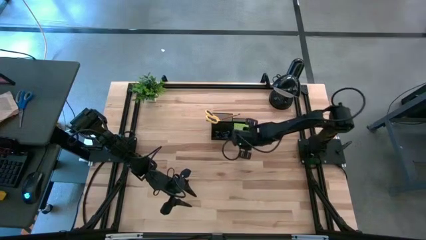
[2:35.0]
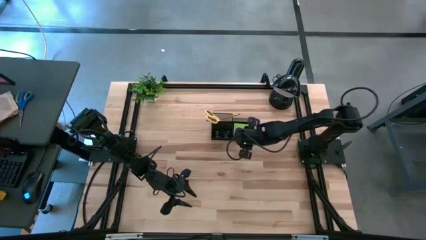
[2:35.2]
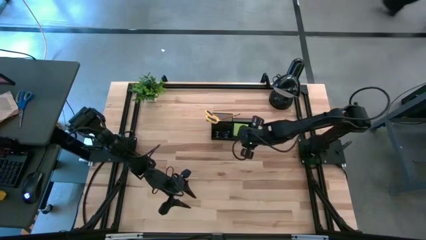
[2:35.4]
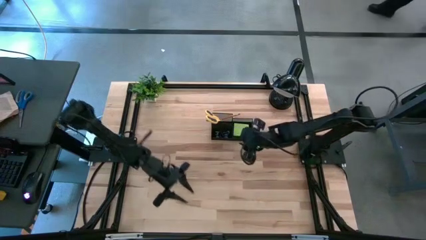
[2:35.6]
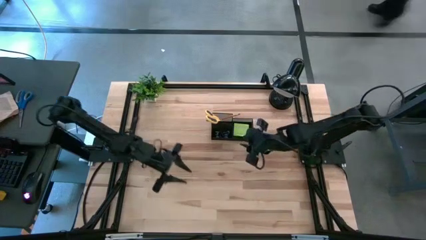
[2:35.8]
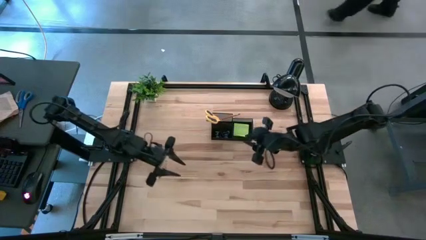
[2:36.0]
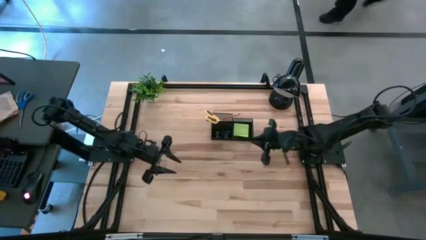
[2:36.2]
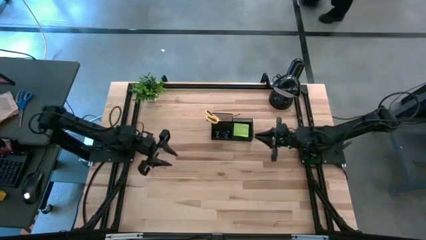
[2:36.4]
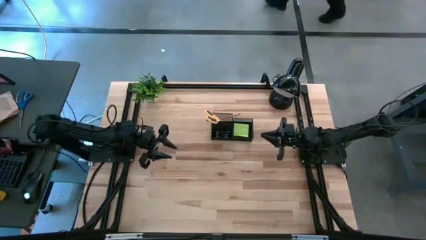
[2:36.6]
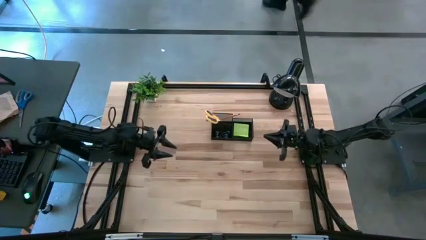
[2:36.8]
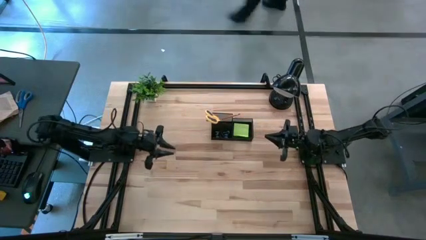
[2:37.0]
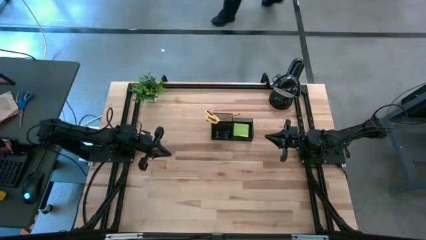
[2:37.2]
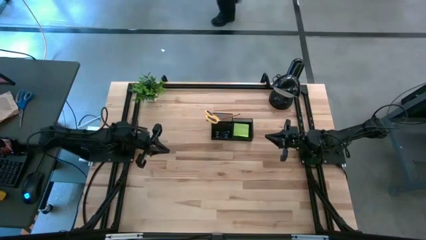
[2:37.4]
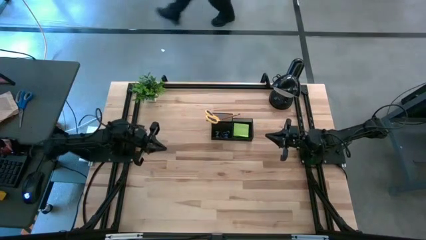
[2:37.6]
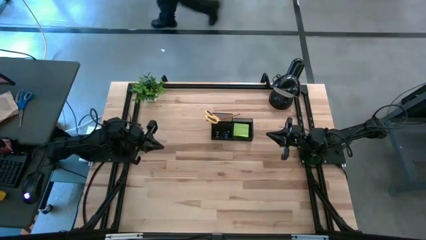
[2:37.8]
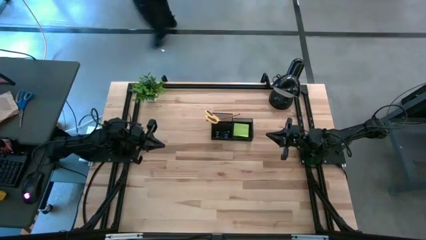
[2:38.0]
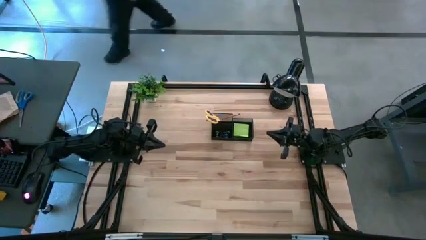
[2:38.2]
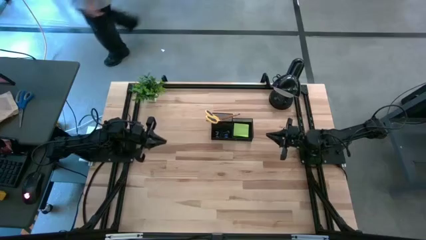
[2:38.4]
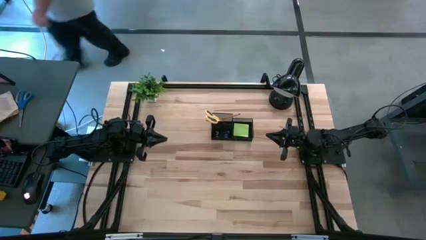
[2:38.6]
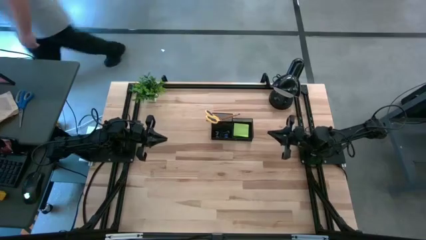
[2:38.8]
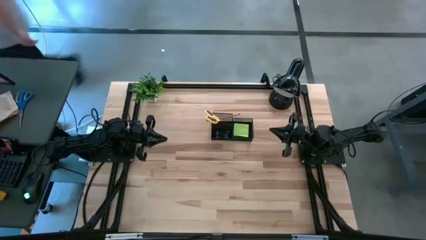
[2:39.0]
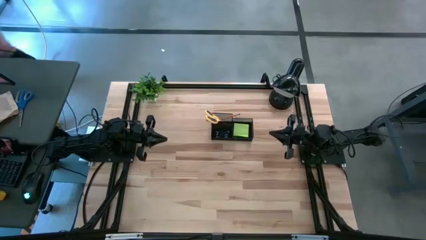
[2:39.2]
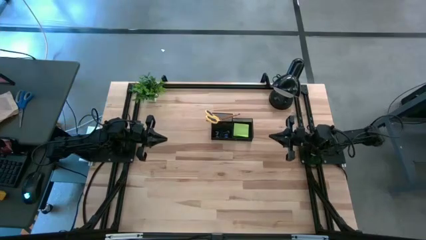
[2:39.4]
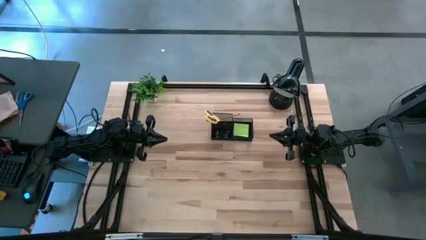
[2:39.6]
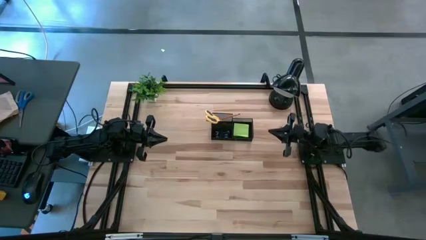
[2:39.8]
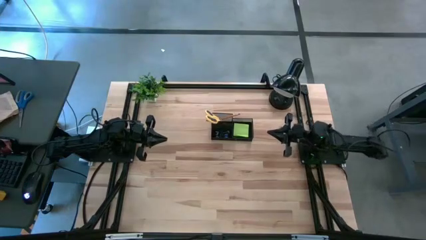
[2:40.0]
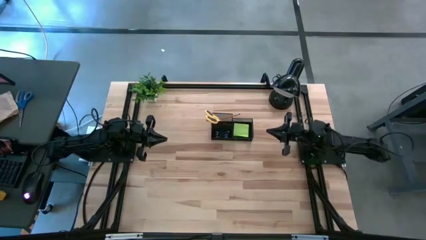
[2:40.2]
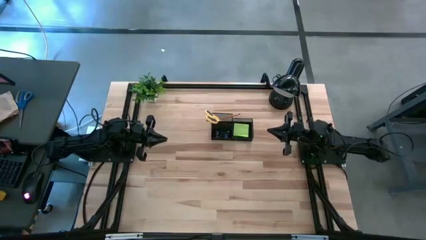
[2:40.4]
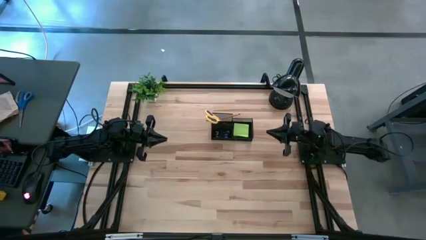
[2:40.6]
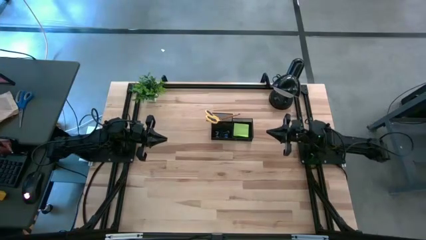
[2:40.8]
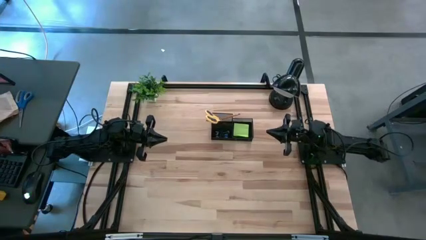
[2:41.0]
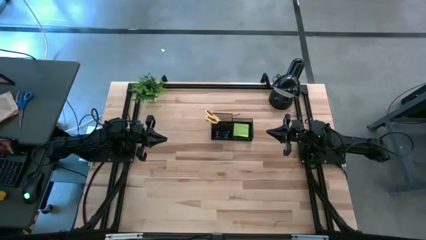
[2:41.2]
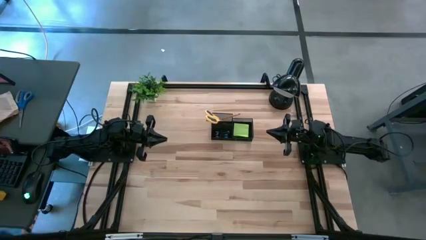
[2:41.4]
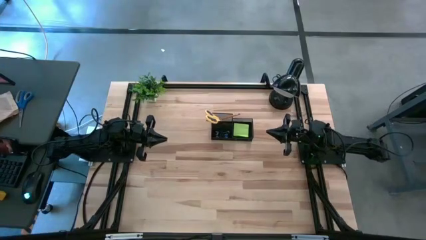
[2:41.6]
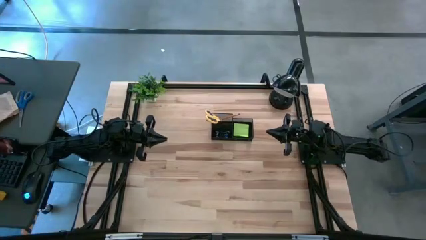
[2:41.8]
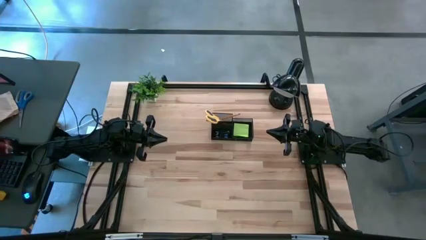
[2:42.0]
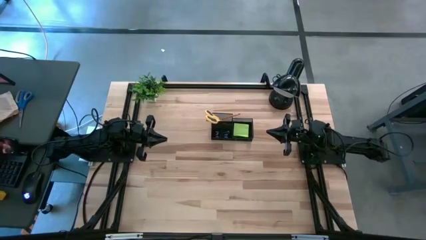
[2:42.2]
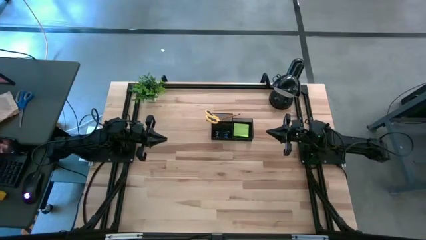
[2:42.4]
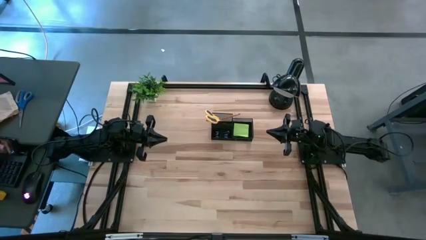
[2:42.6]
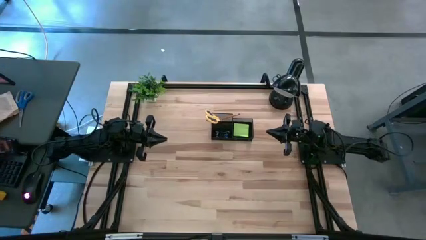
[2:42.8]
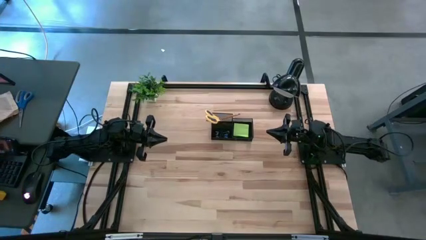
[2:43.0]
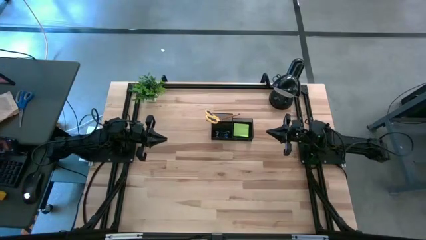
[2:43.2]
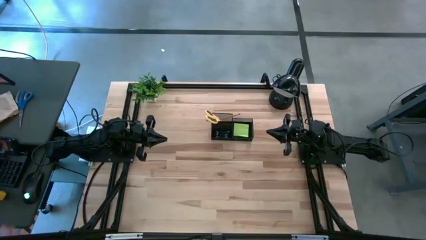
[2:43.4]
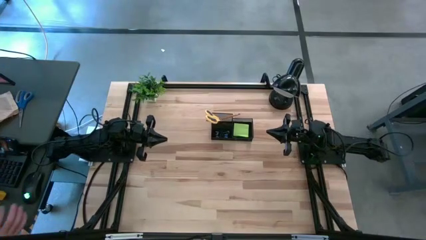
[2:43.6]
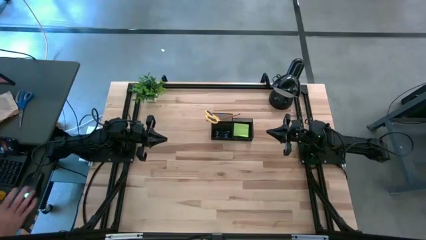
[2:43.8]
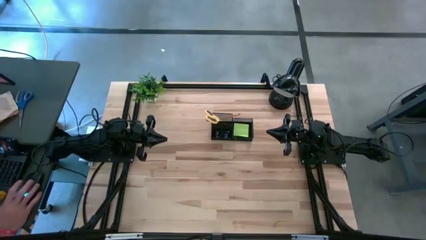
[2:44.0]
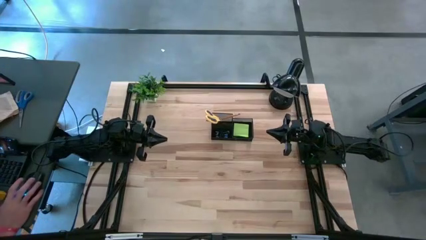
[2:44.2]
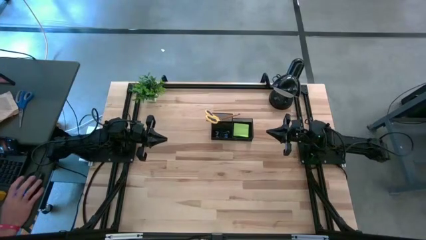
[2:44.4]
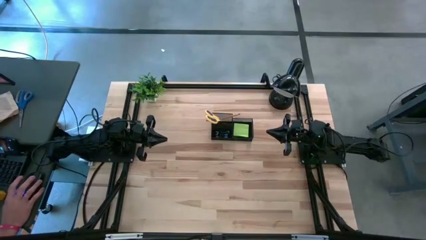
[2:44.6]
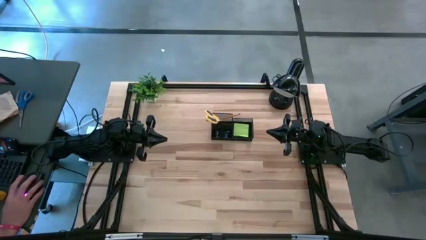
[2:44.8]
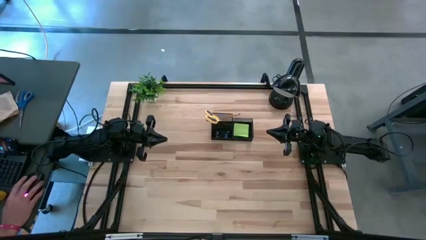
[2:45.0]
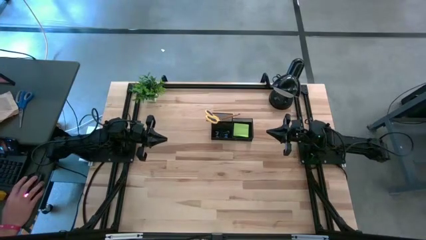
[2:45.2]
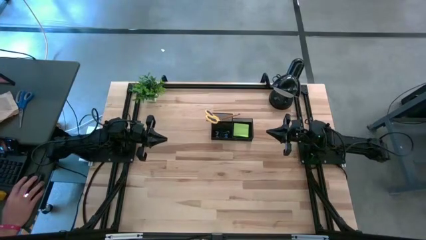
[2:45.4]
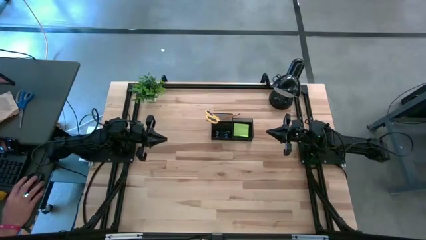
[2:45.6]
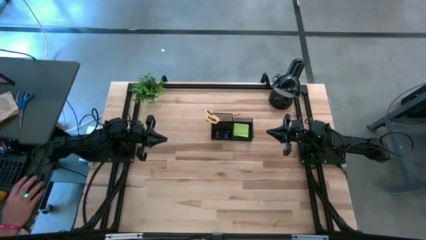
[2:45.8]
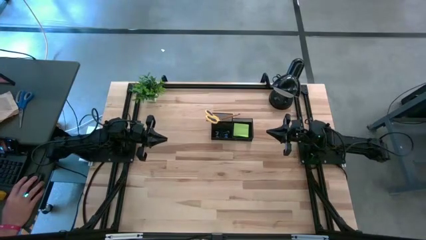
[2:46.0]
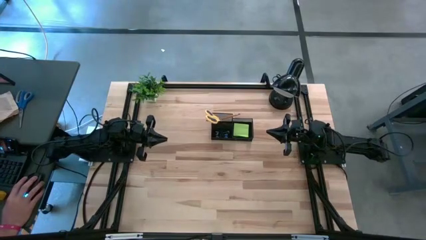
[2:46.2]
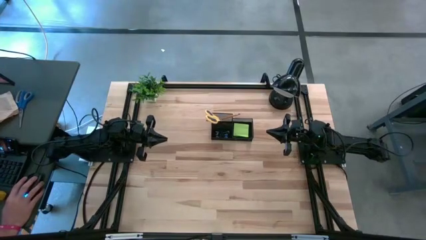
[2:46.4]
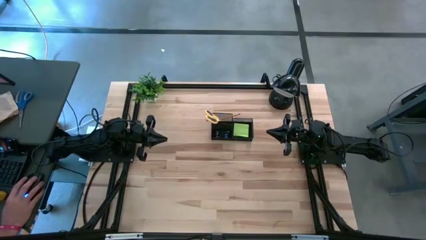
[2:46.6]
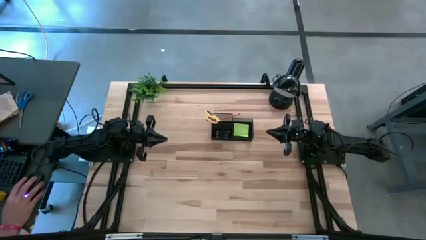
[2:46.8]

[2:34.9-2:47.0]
Task: Pick and place office supplies into organizer
Return to Home Position

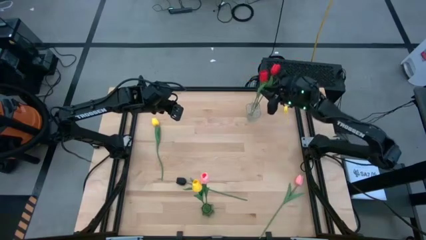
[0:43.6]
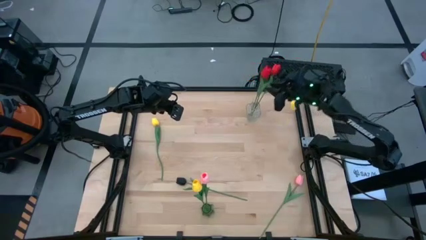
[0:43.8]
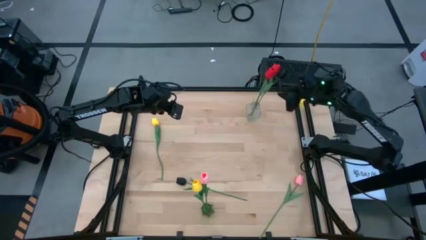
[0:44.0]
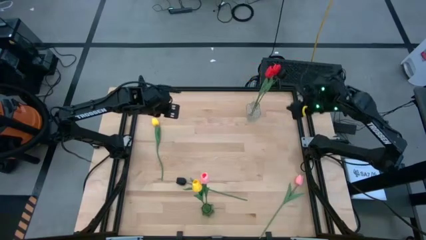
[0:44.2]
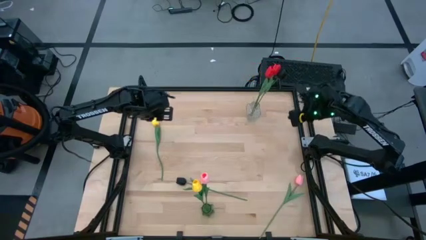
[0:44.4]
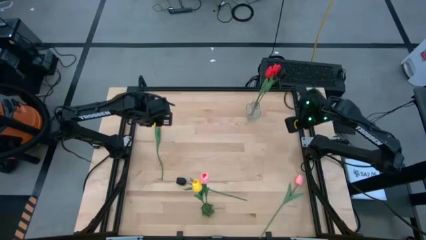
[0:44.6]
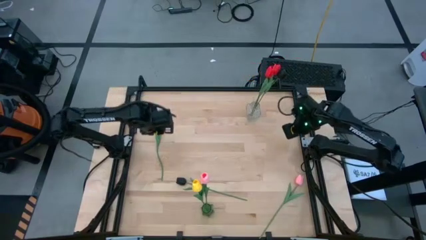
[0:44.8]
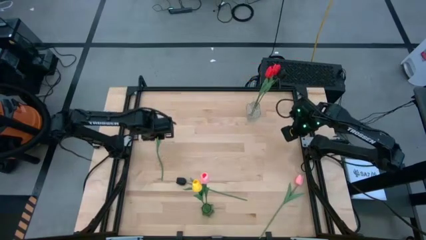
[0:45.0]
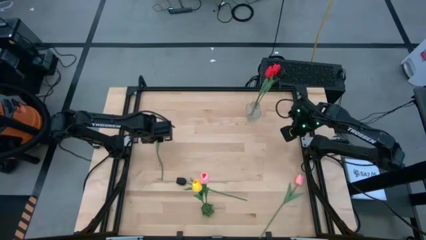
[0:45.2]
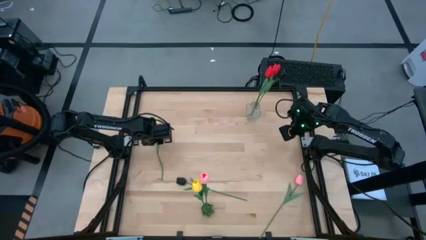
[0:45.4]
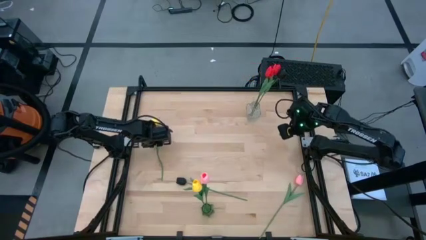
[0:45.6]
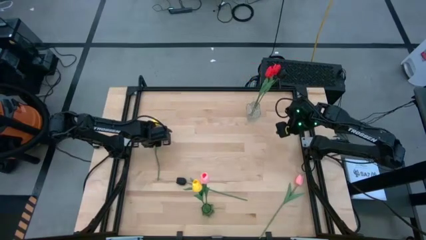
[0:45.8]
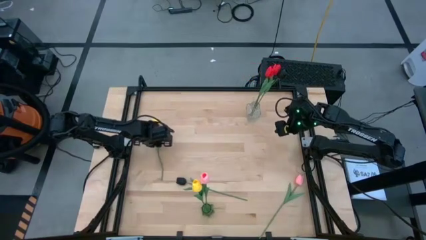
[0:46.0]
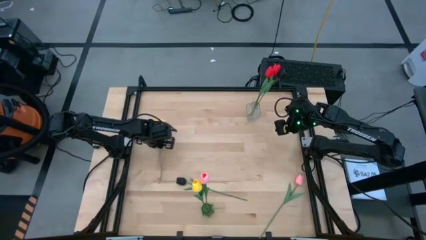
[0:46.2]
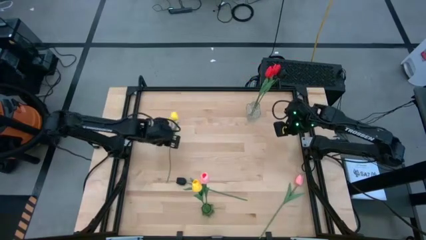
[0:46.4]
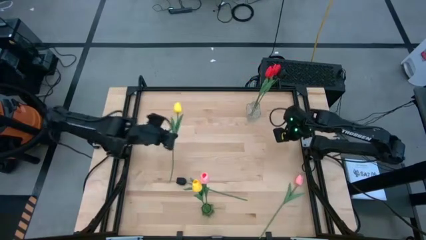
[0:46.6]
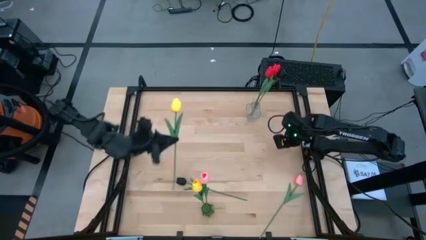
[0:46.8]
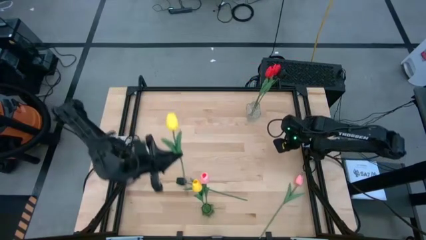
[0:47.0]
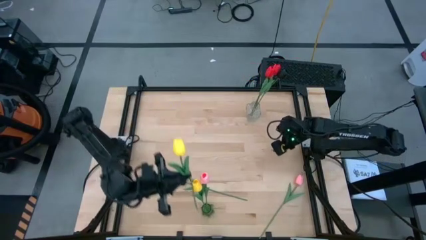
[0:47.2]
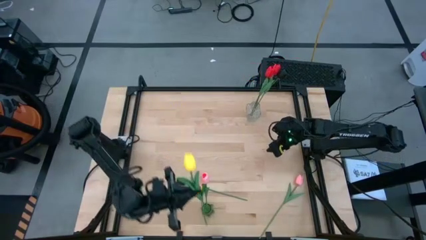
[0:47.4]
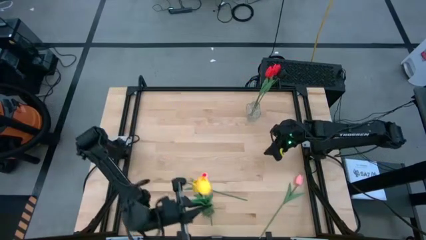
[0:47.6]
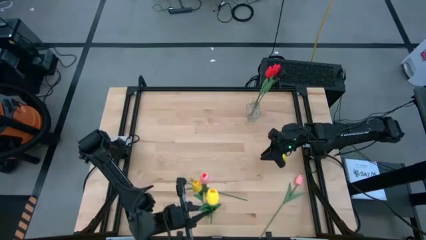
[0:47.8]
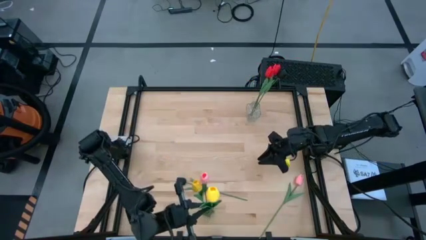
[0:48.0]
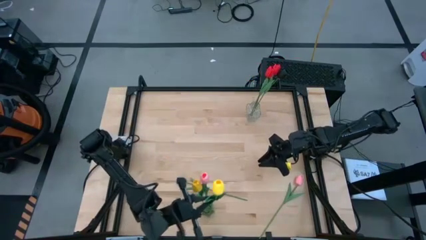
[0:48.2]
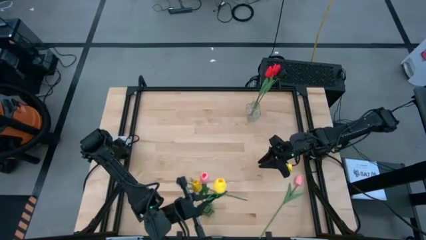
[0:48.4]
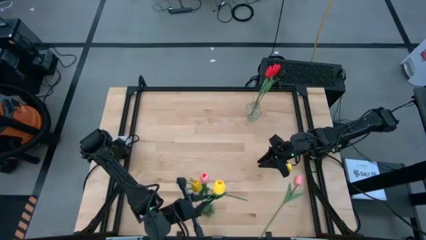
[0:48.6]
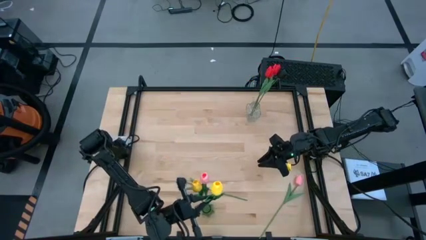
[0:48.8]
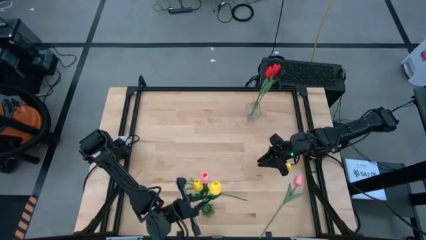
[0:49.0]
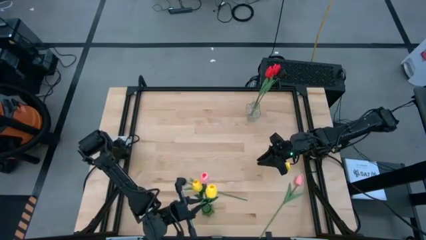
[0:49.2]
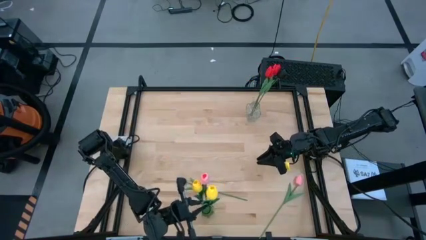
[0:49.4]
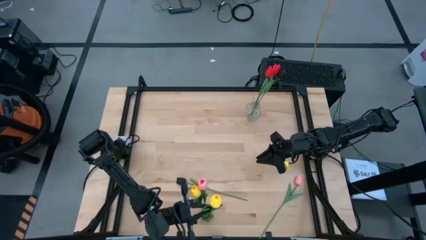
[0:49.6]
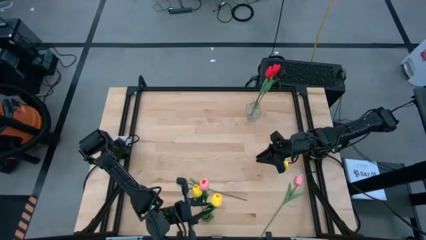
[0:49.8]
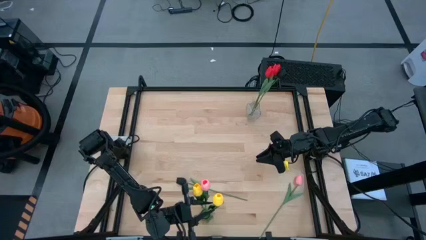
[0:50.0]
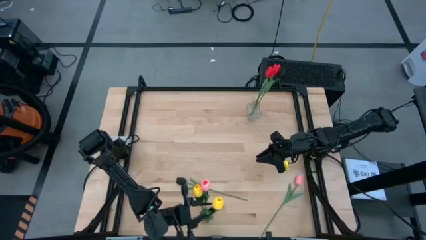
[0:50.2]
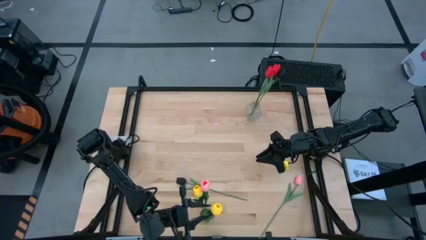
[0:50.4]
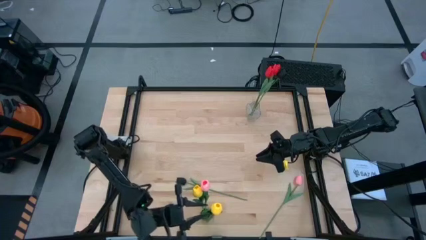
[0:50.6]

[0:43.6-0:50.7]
Task: Sort flowers into vase by color
Put the yellow flower into the green vase
